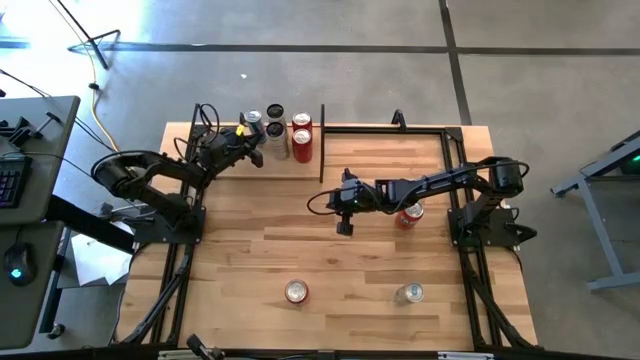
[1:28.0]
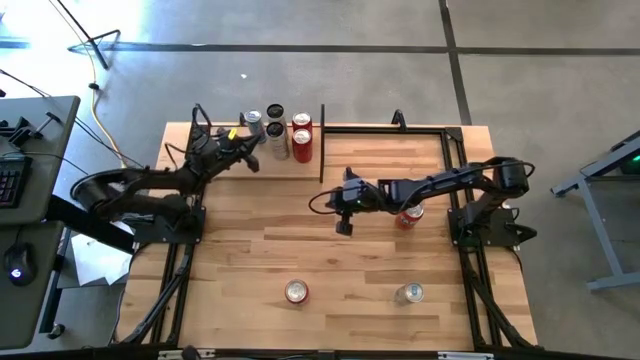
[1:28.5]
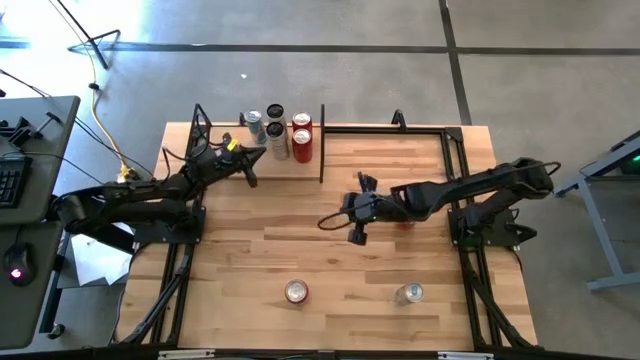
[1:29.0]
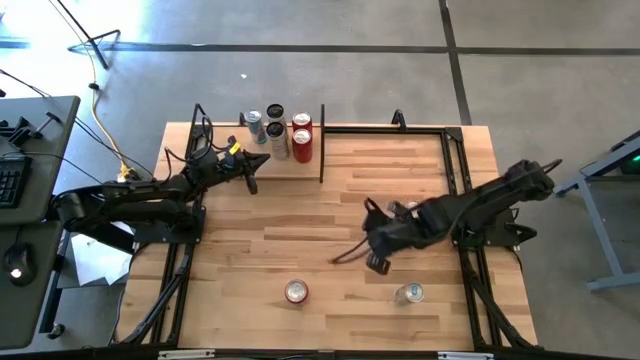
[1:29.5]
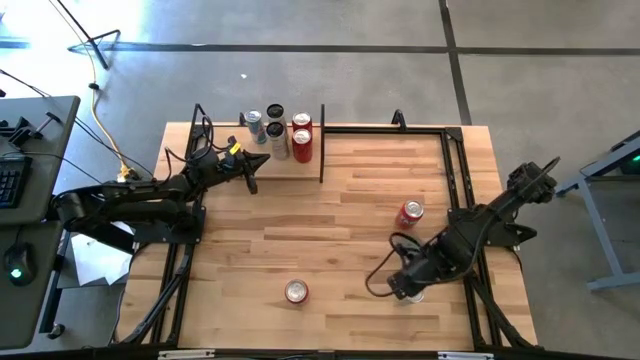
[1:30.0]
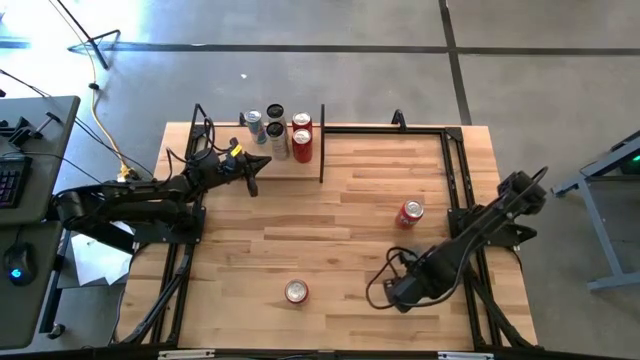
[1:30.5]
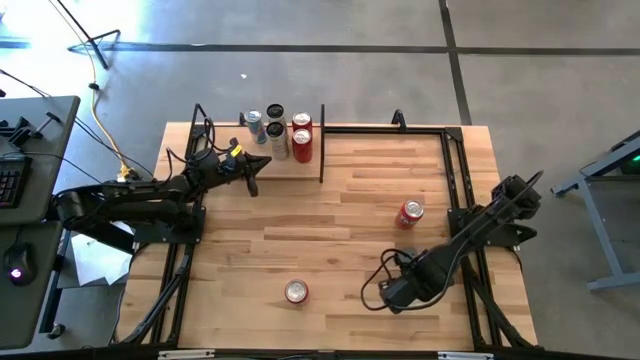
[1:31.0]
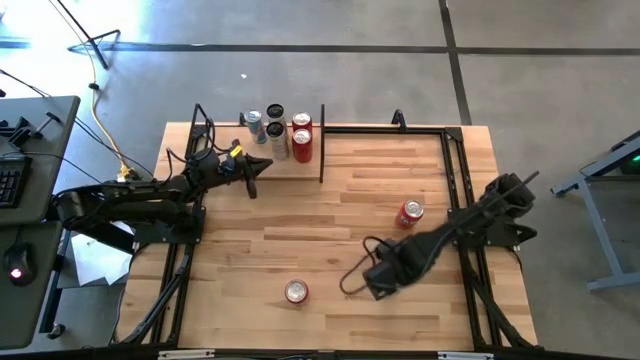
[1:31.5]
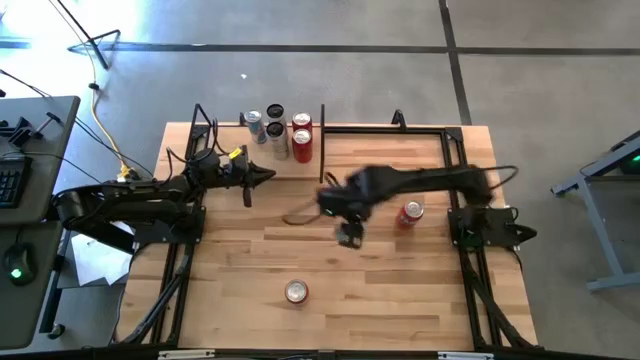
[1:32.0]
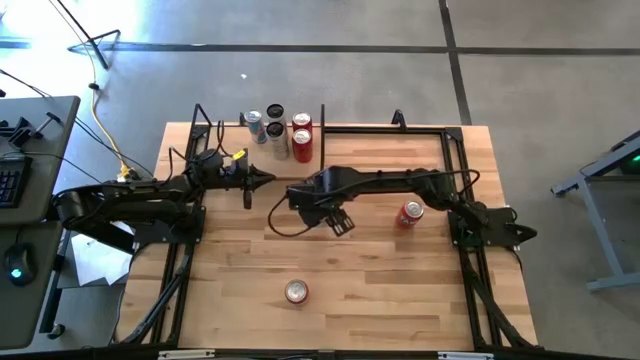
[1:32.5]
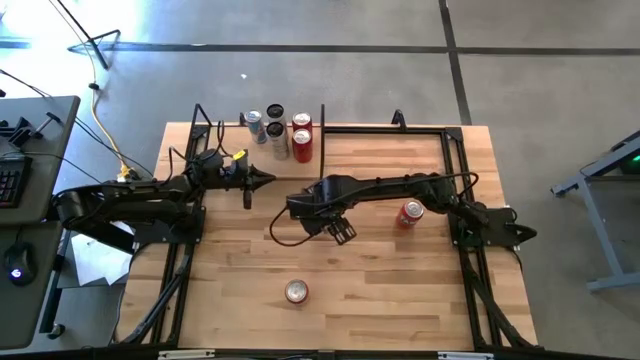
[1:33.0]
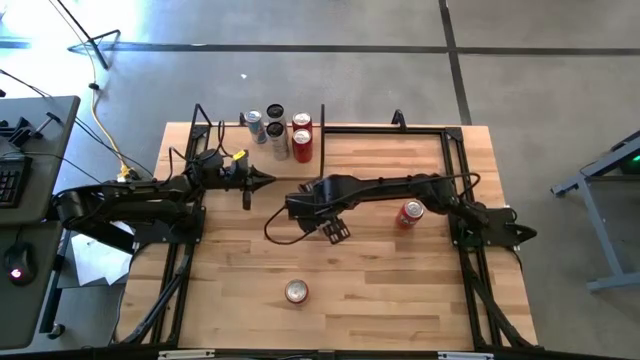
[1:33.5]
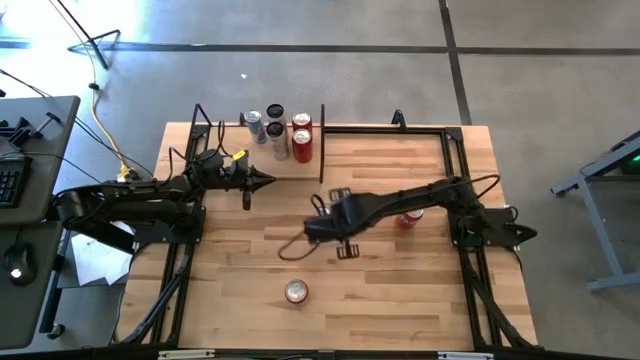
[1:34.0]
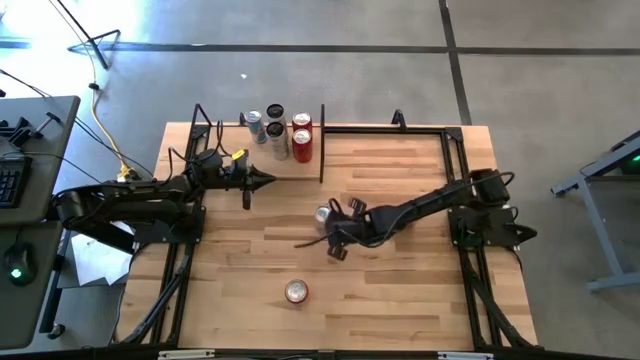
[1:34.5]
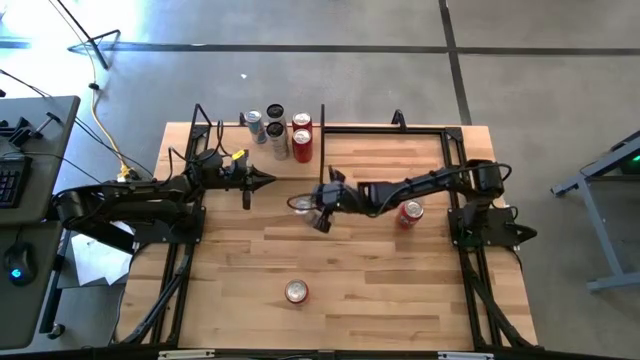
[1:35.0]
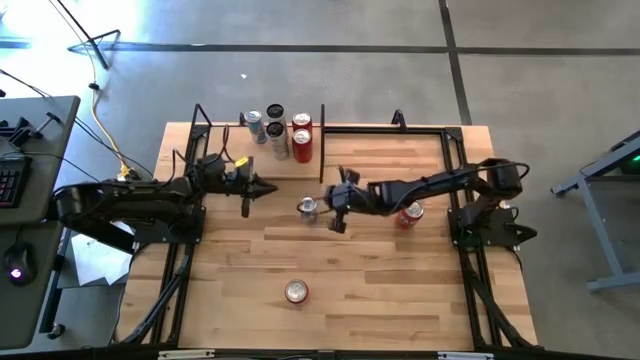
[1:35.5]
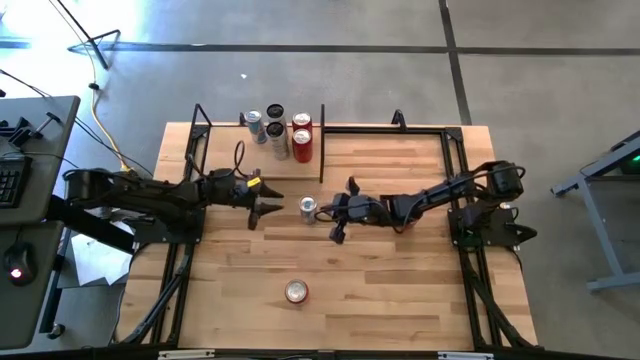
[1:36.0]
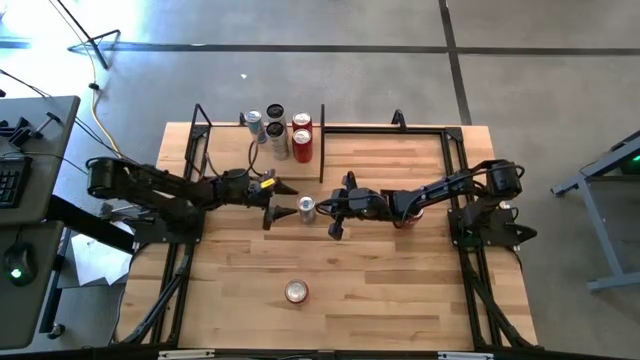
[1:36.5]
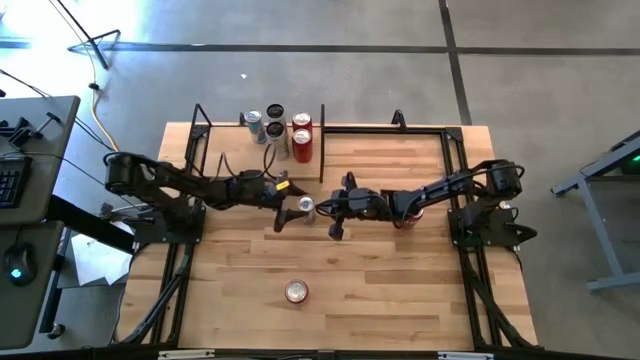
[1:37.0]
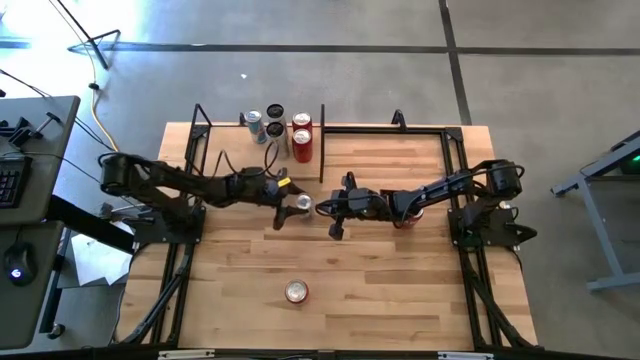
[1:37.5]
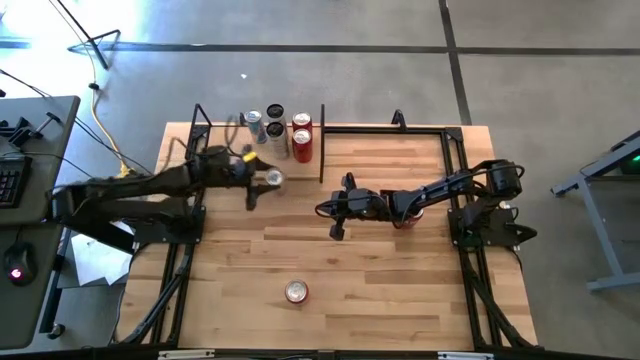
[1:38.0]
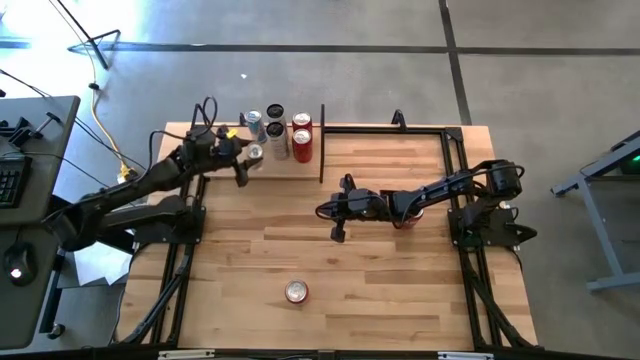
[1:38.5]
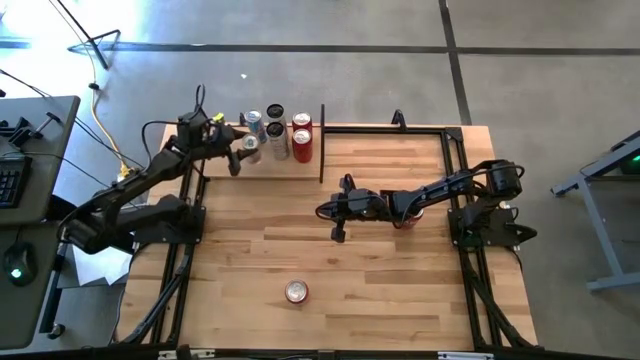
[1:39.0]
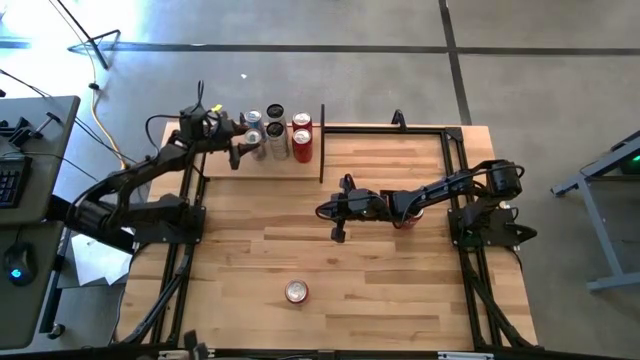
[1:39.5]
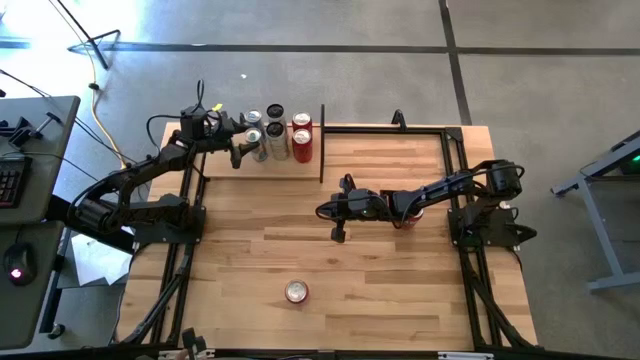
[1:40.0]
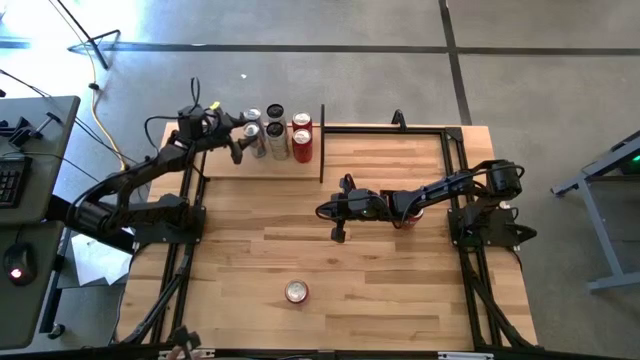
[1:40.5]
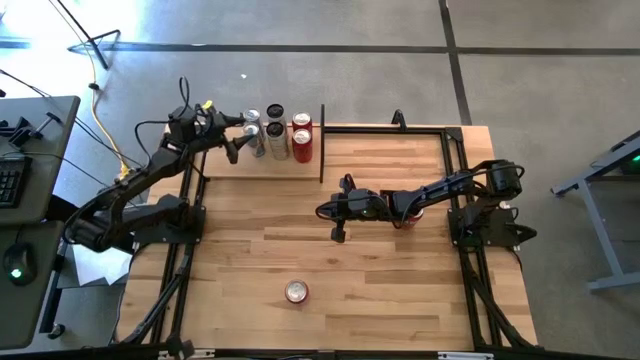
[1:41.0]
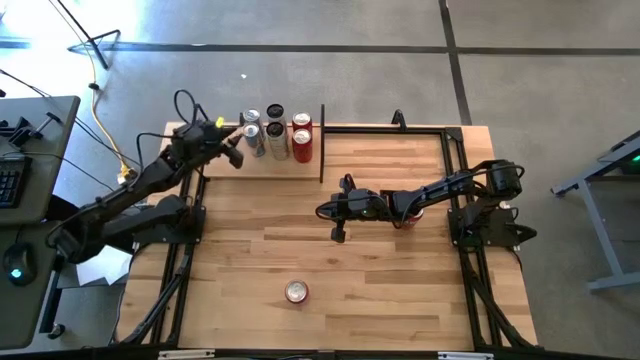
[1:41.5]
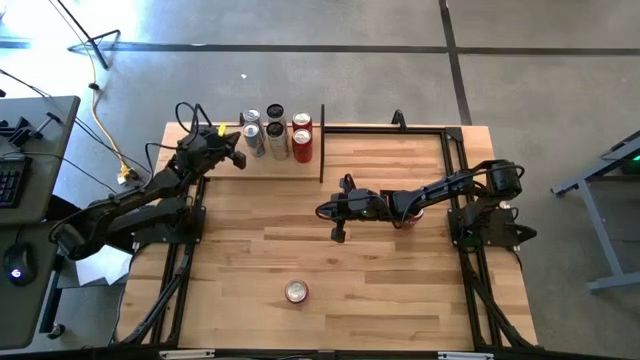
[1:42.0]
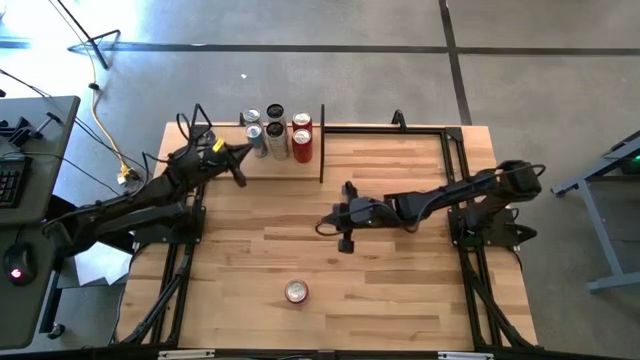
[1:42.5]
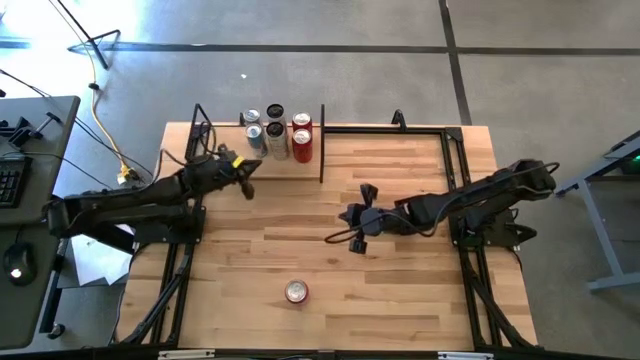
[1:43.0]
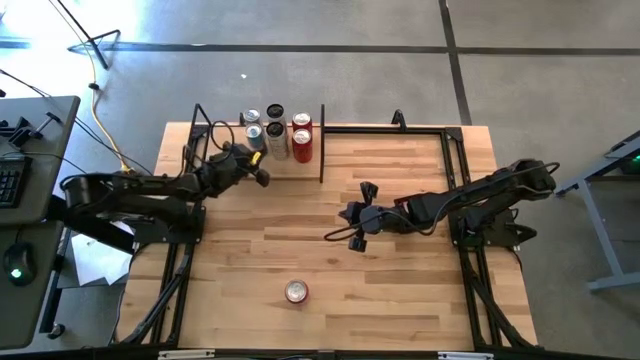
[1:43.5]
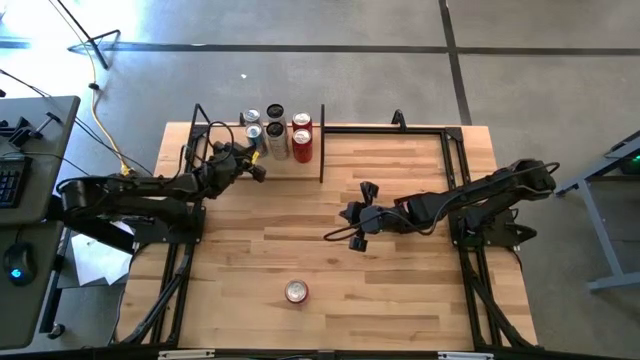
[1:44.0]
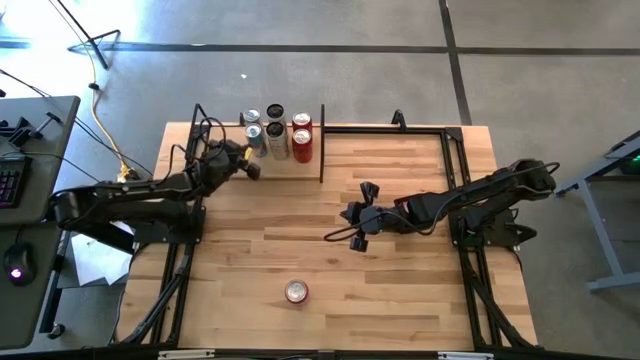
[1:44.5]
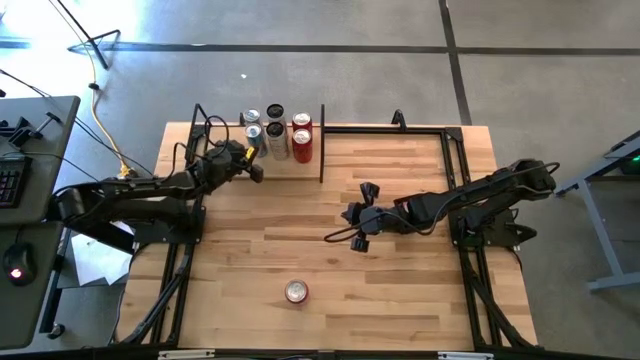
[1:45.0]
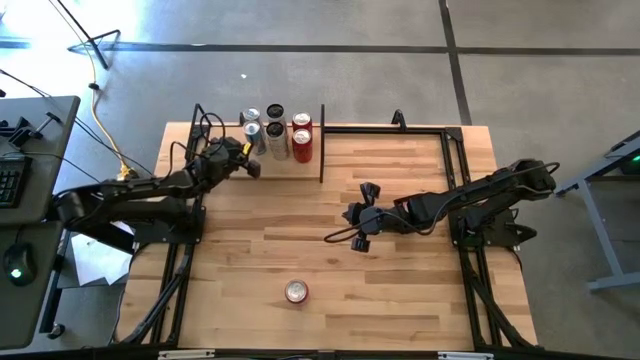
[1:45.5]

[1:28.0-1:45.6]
Task: Place canned beverage on shelf
Put the blue soda can aligned with the other blue soda can on the shelf
